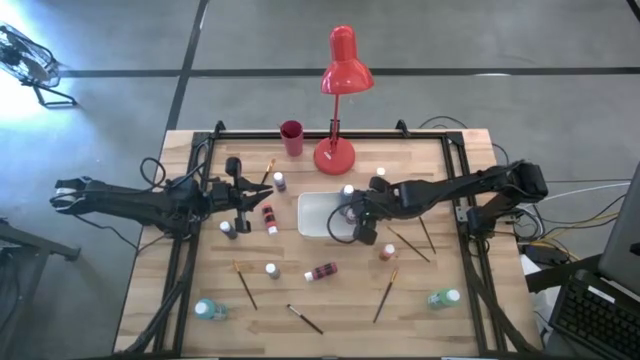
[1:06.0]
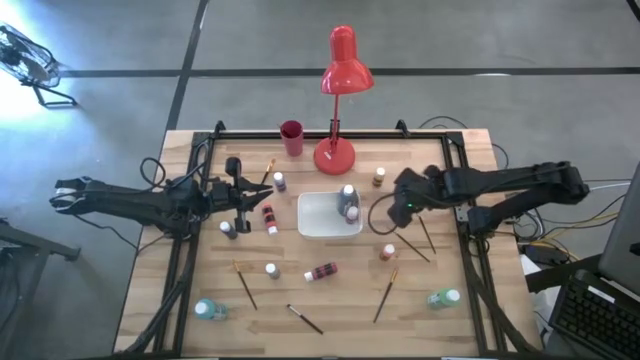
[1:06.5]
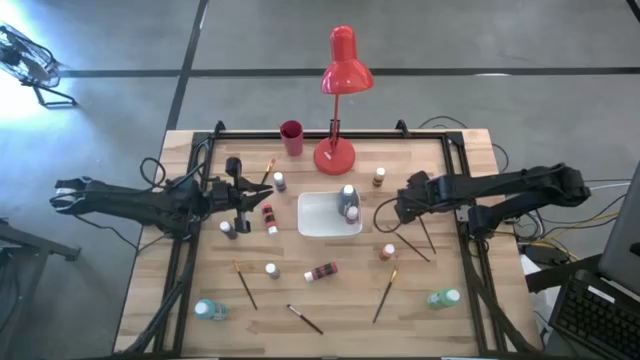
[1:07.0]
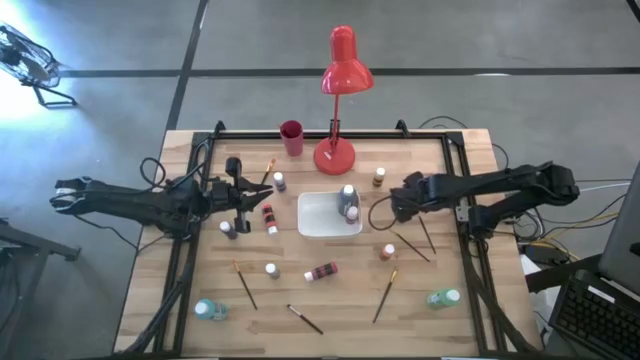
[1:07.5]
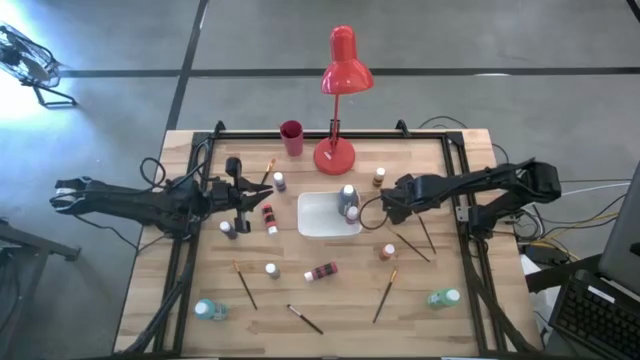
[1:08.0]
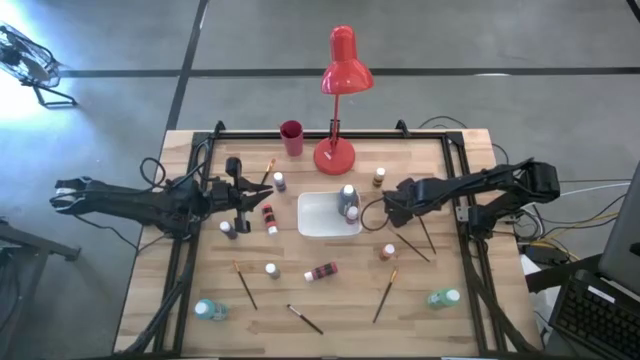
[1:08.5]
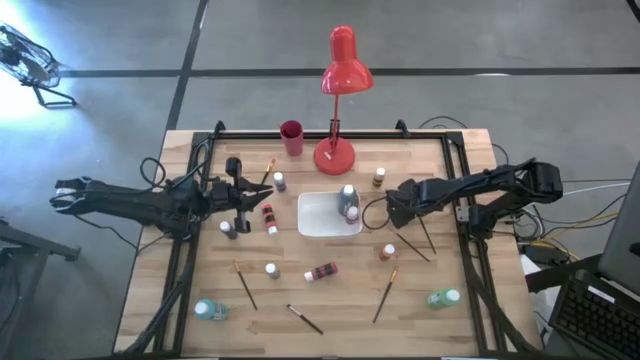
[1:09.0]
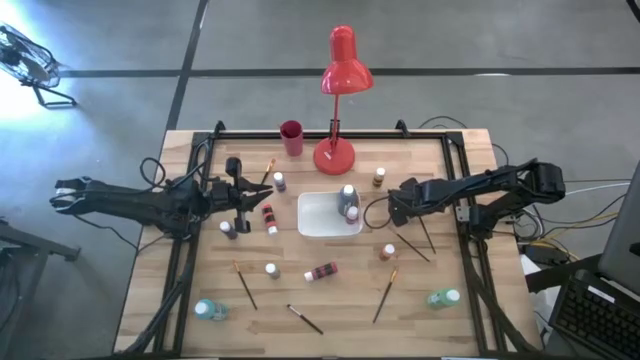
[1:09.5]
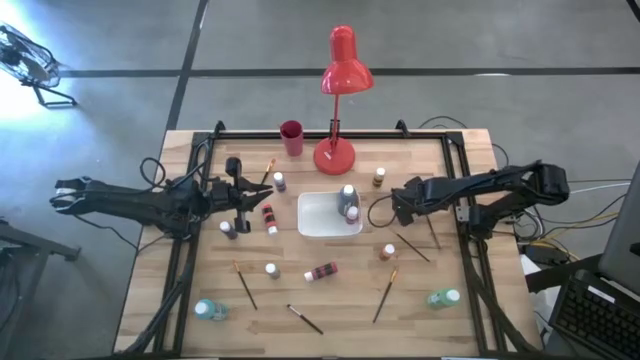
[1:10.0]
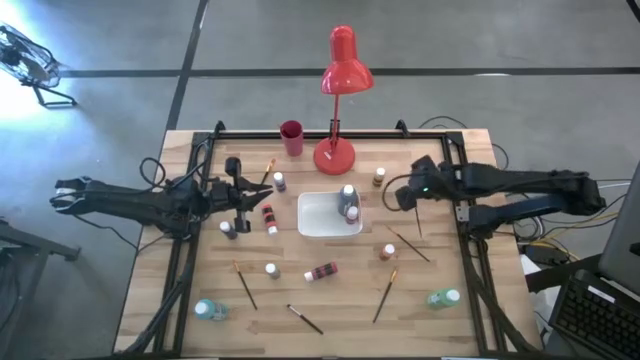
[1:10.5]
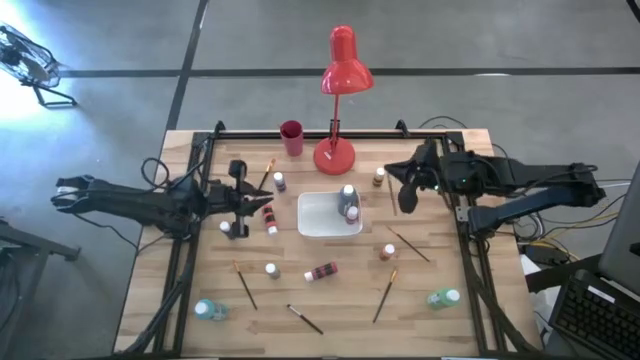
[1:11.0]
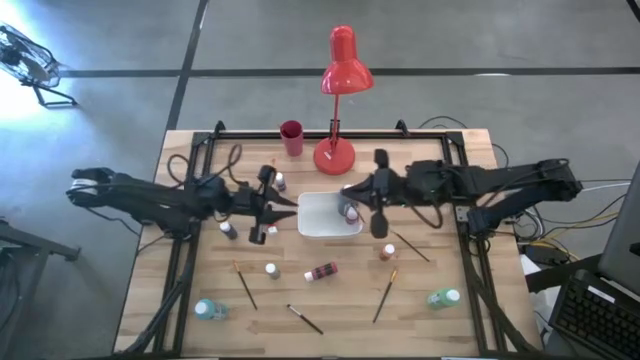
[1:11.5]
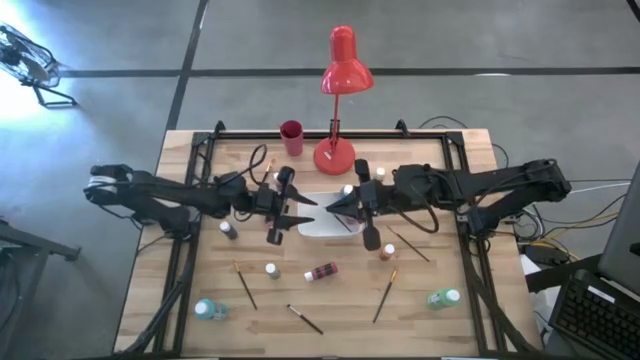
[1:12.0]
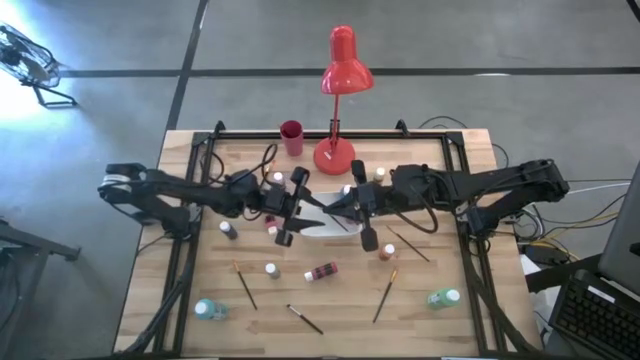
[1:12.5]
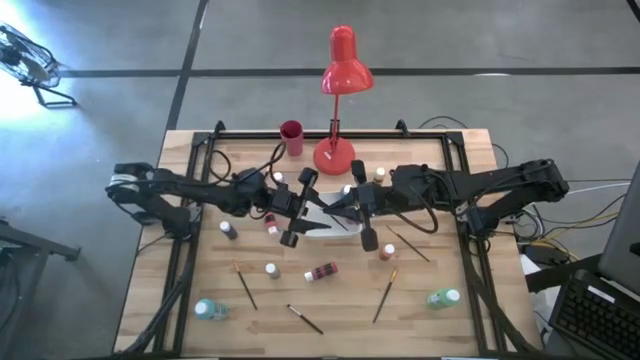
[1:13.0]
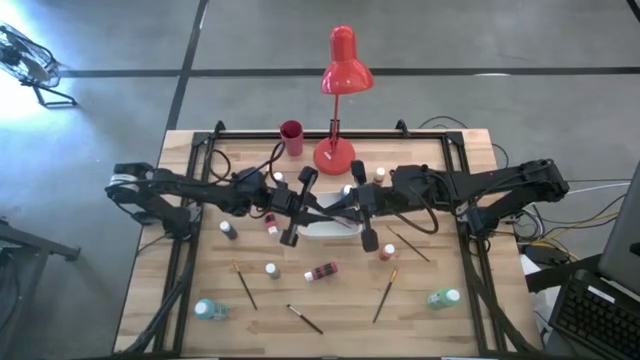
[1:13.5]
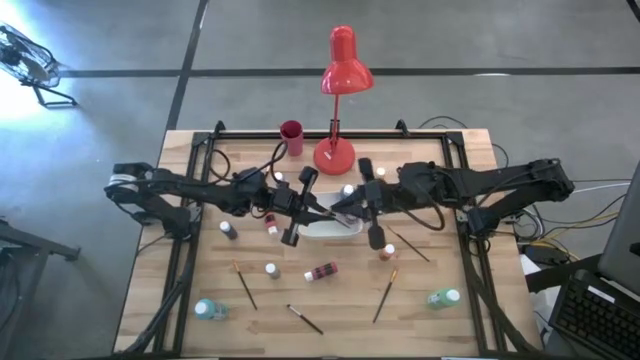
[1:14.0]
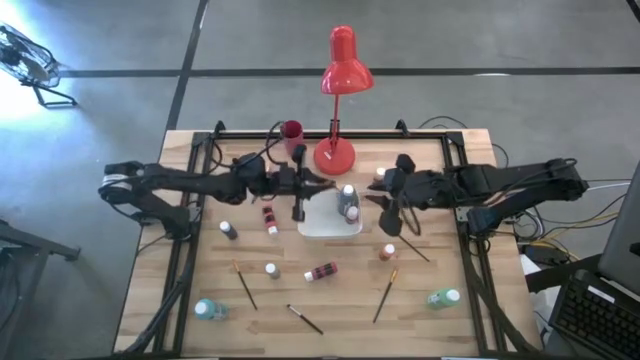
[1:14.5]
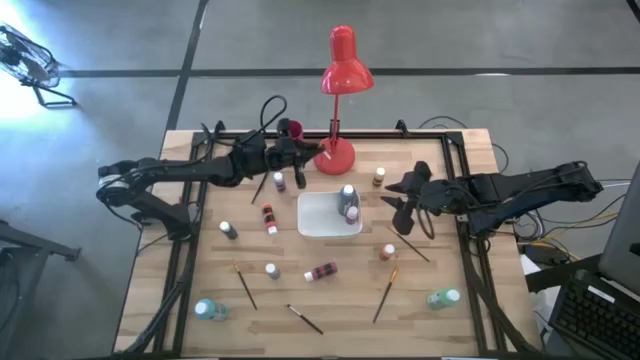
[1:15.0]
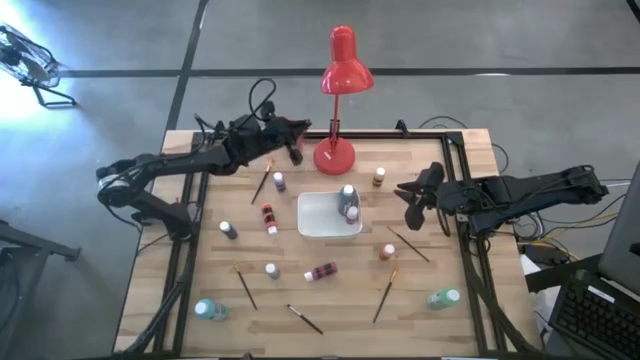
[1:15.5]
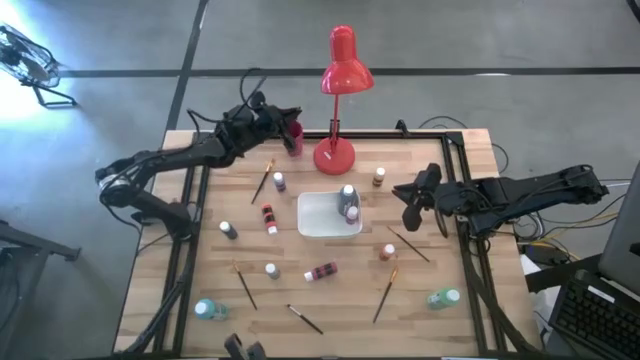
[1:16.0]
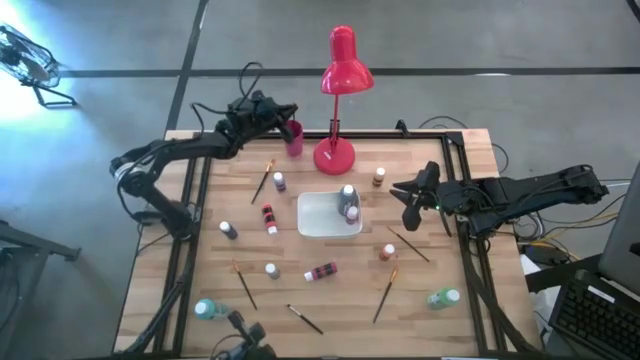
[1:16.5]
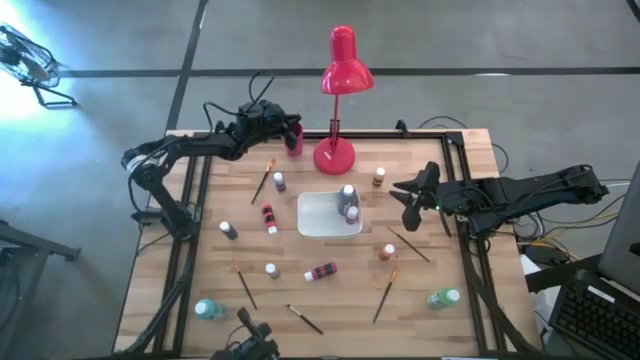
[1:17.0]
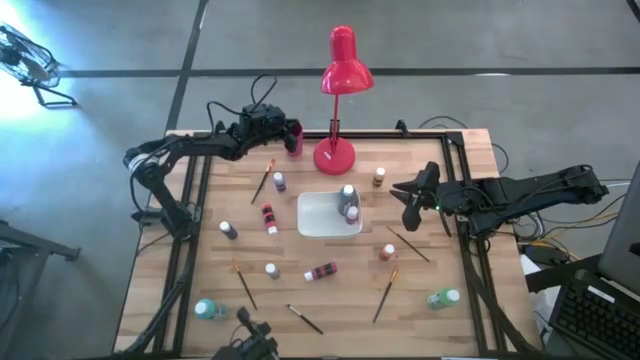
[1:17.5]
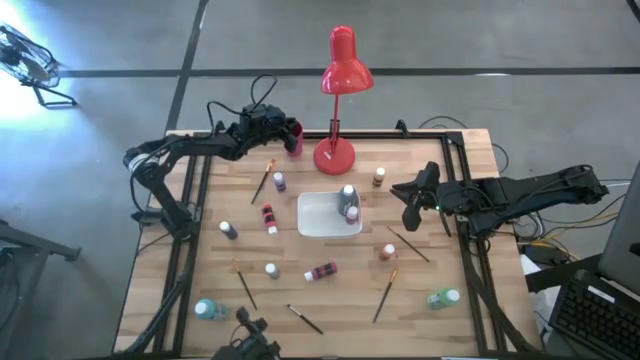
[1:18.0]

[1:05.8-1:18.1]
Task: Pick & Place Paint Supplies
Put the gold paint brush into the red cup

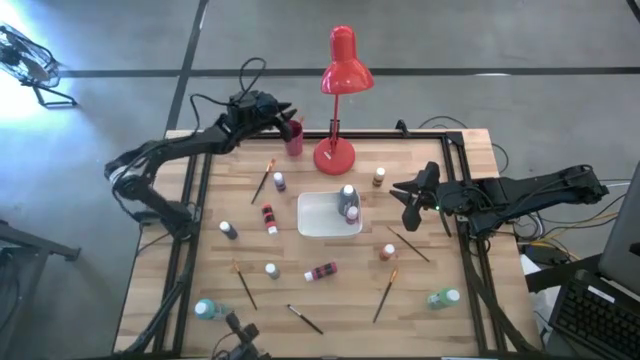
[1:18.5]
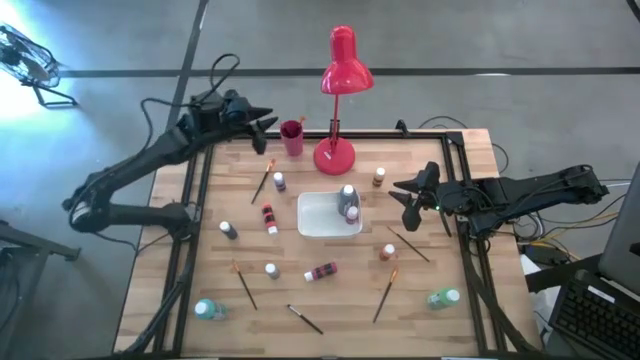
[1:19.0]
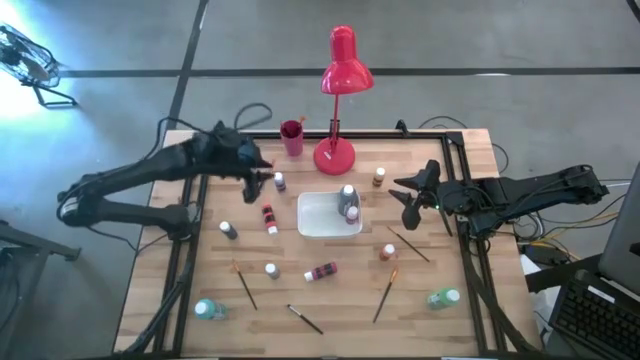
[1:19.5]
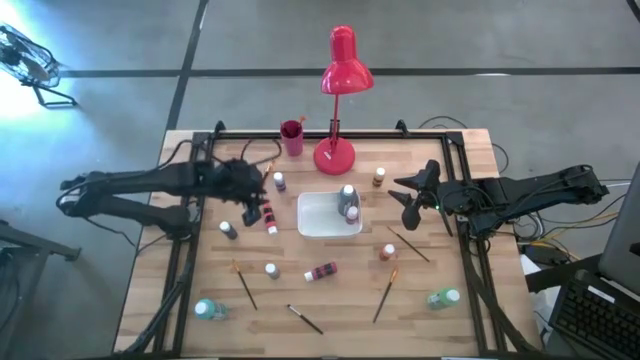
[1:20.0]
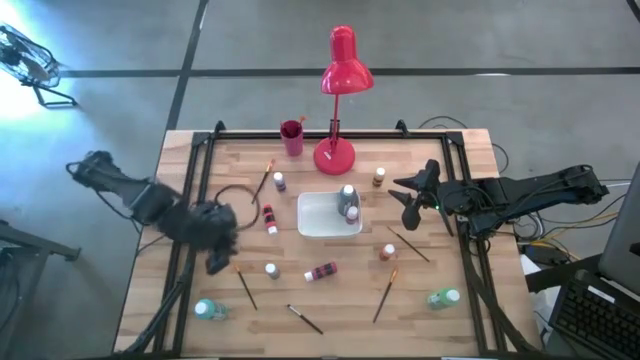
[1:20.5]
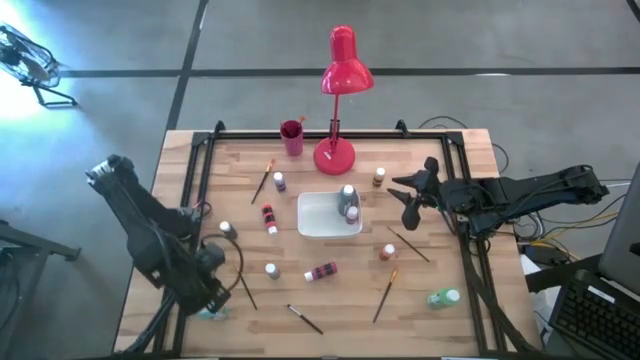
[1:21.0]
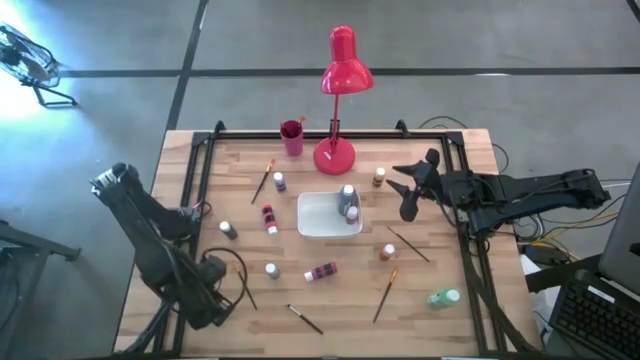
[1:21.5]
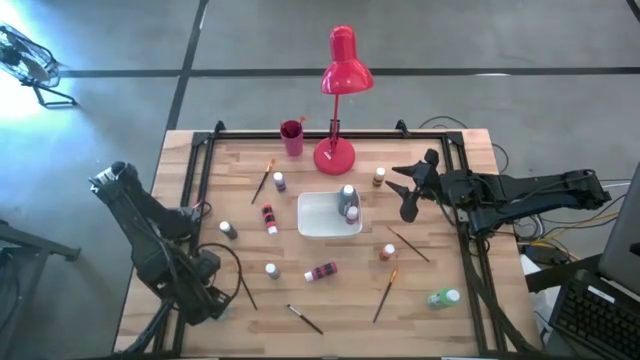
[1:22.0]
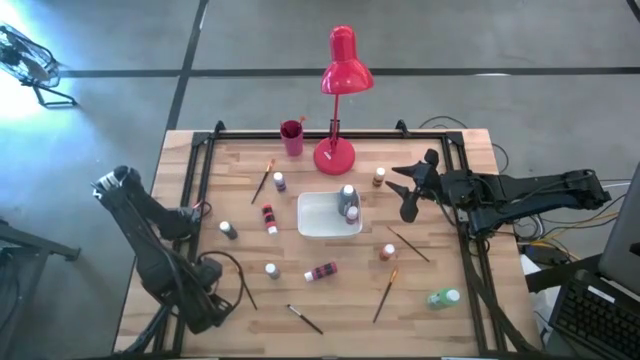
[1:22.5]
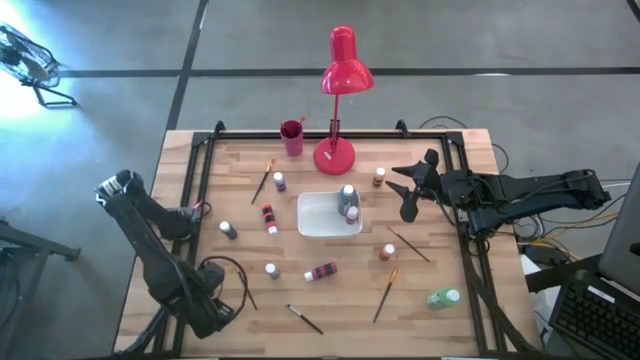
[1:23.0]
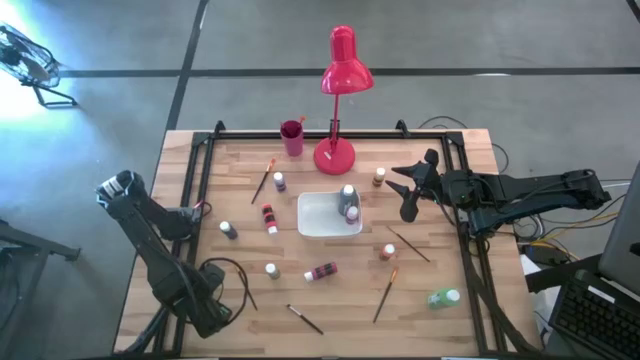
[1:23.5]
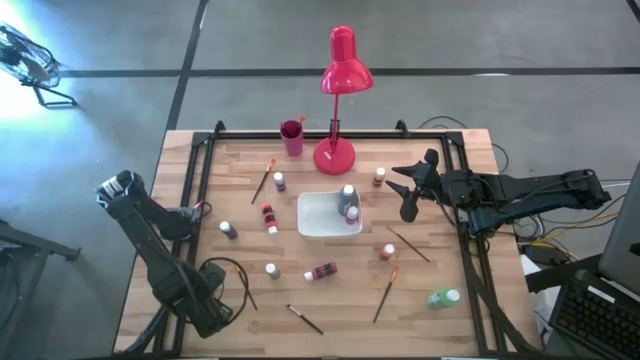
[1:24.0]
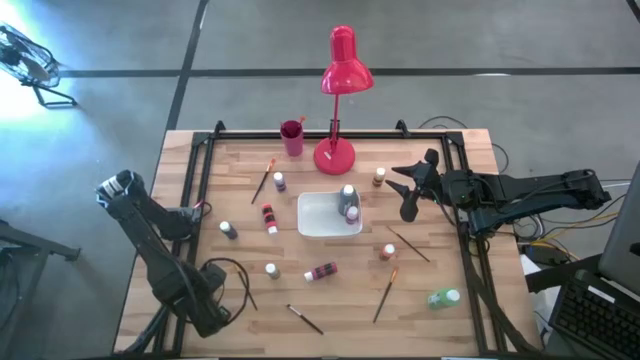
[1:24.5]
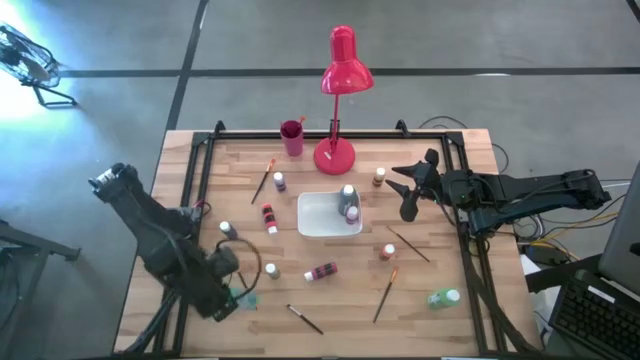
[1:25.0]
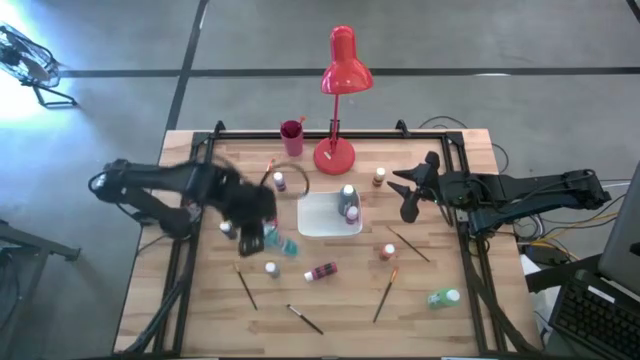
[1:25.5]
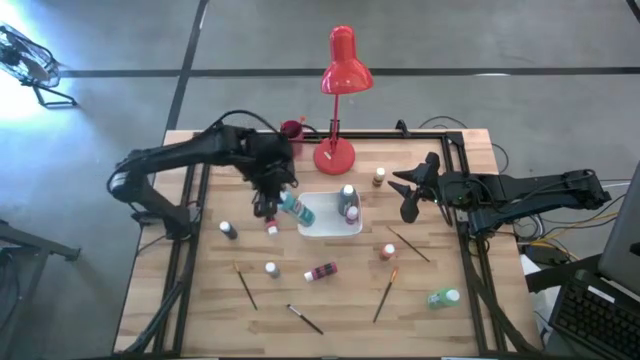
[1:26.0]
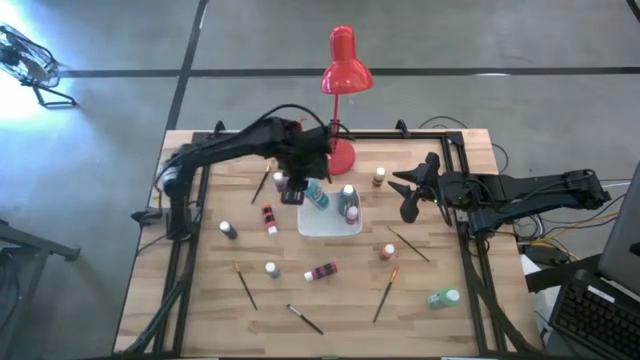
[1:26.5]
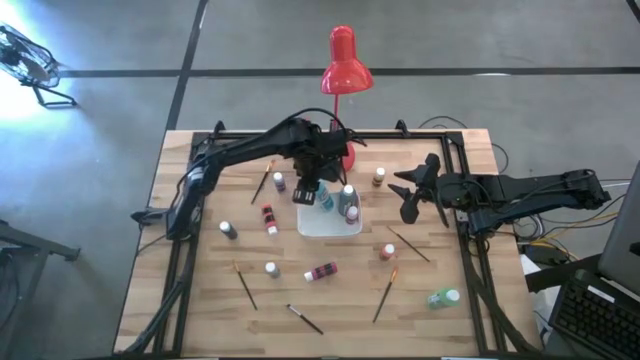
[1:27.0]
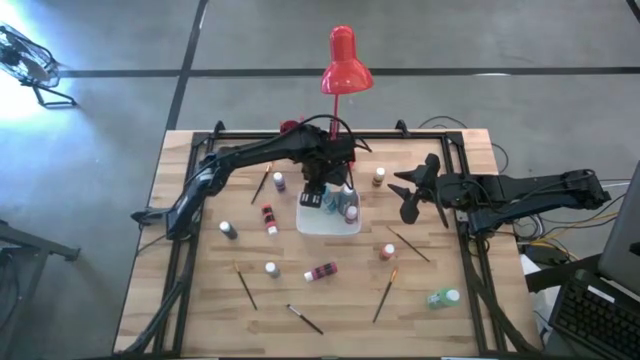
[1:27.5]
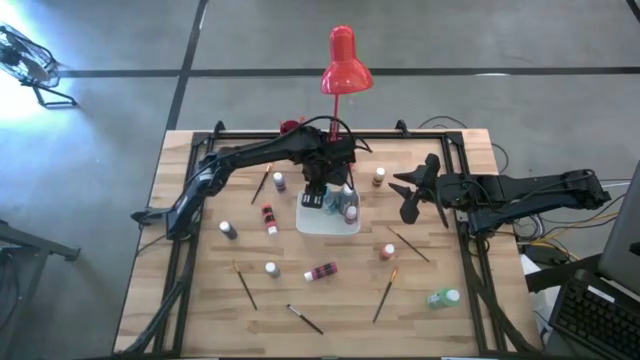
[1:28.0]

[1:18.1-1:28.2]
Put the light blue paint bottle into the white bin
